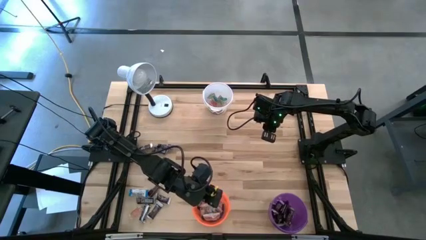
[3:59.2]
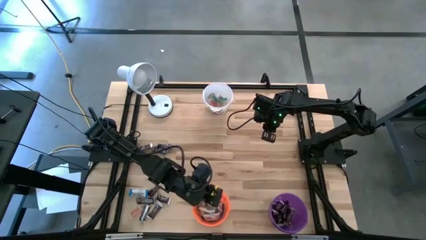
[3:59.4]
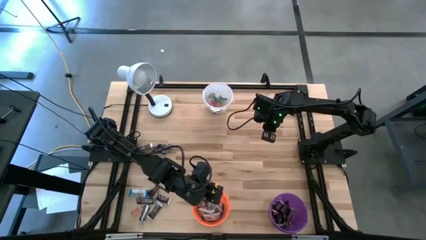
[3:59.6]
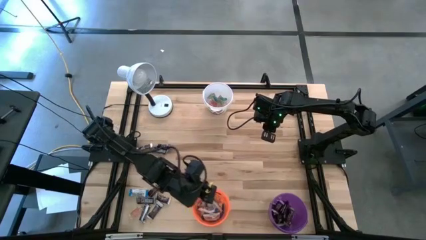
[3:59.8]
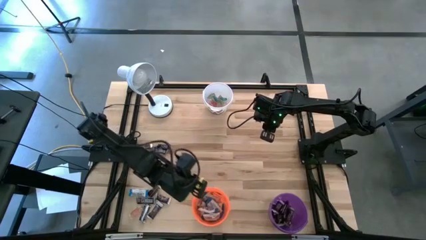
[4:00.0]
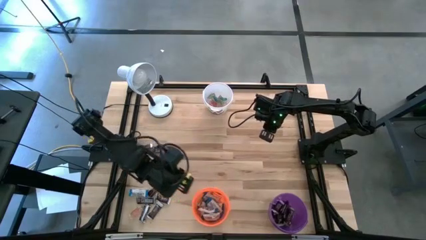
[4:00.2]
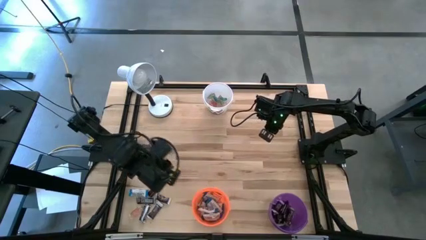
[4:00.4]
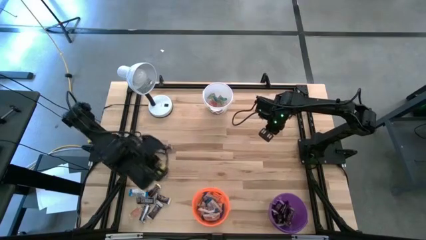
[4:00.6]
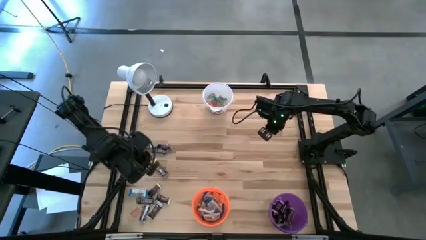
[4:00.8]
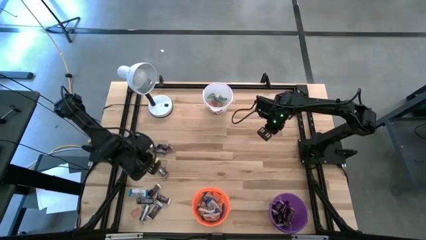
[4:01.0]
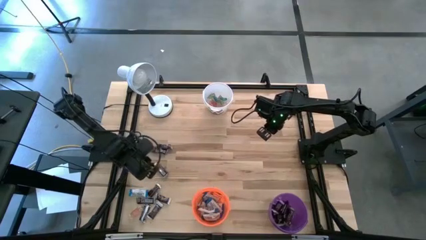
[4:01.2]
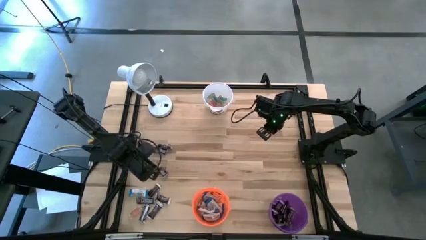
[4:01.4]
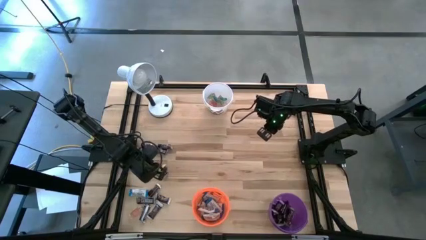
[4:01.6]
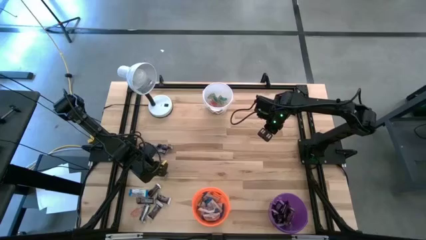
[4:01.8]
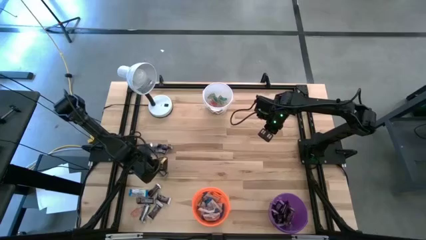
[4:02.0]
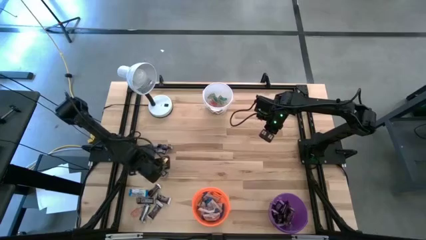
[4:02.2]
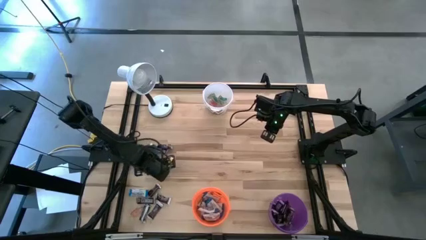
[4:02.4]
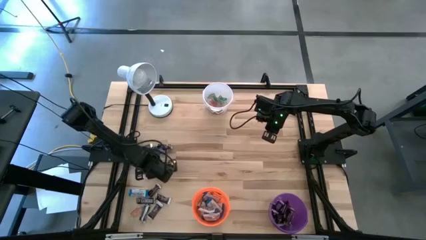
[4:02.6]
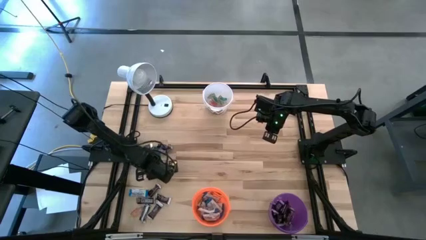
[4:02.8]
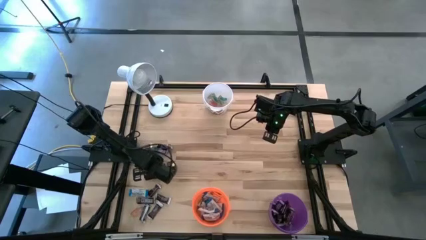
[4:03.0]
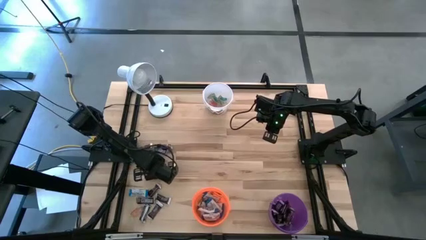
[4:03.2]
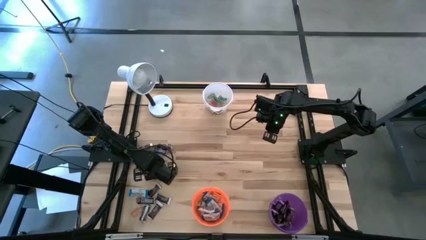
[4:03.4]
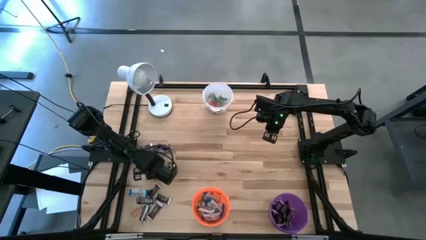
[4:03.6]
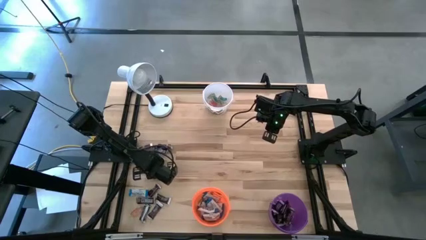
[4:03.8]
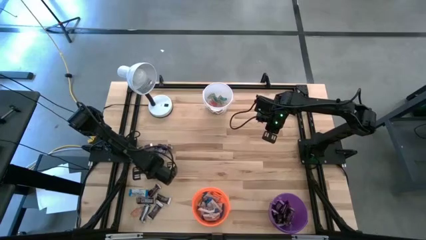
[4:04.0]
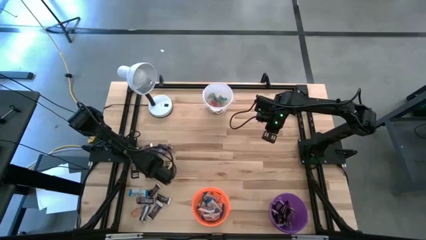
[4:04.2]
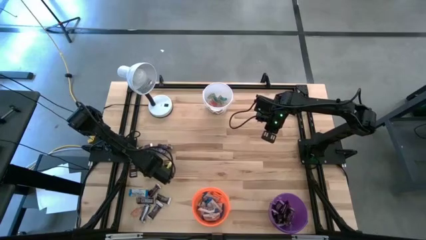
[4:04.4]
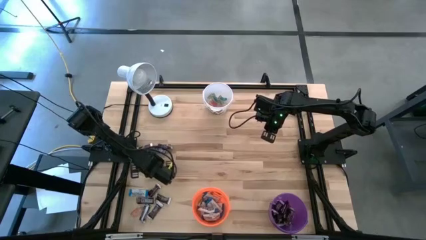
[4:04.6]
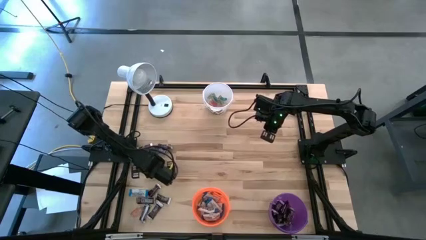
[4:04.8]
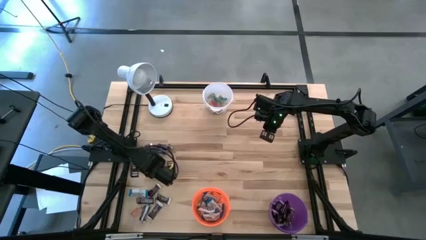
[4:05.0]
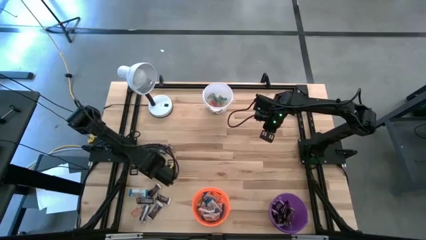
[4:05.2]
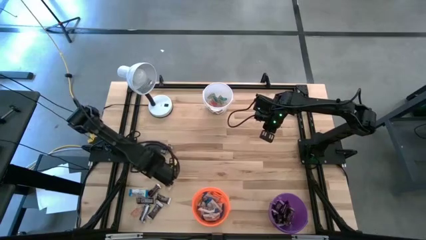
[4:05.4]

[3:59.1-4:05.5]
Task: Organize candy in baskets
Put the dark brown chocolate bar into the dark purple bucket

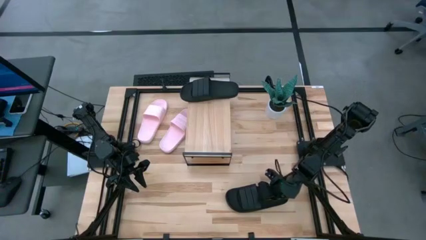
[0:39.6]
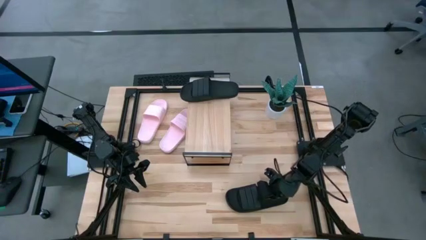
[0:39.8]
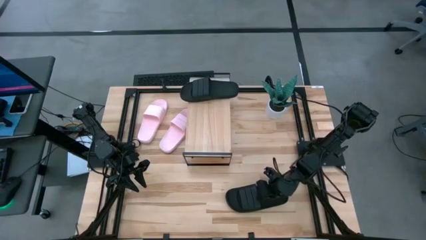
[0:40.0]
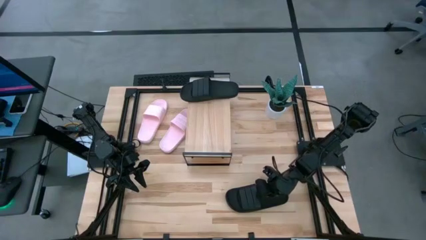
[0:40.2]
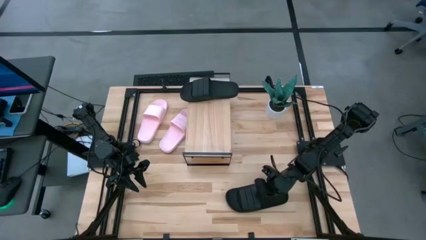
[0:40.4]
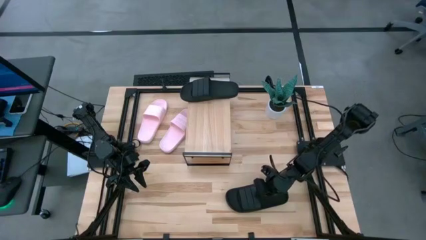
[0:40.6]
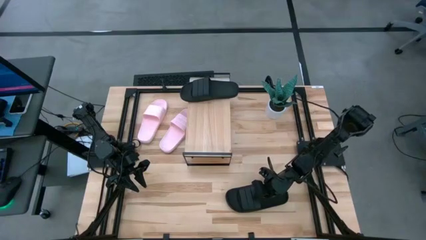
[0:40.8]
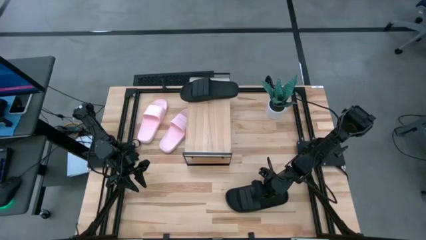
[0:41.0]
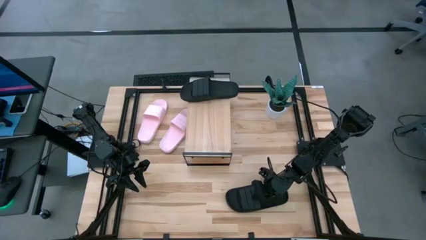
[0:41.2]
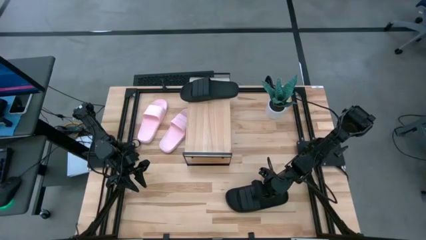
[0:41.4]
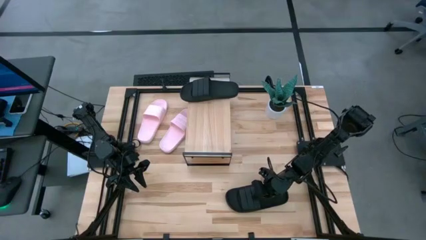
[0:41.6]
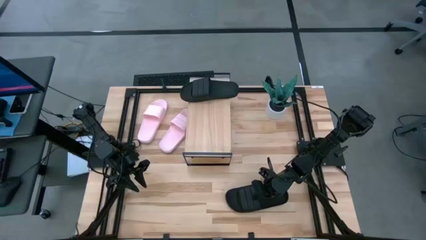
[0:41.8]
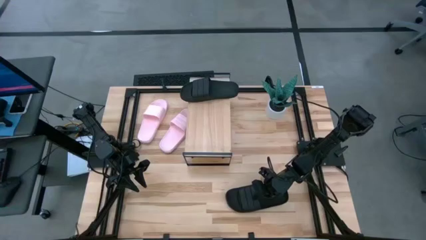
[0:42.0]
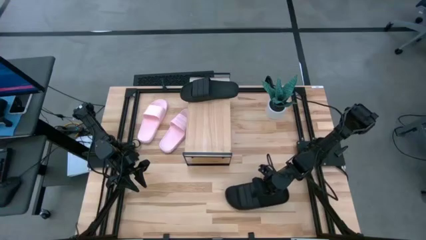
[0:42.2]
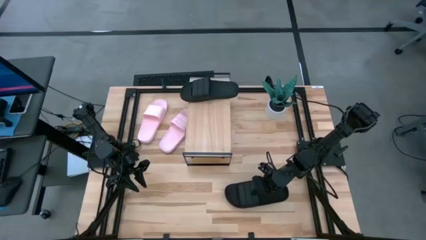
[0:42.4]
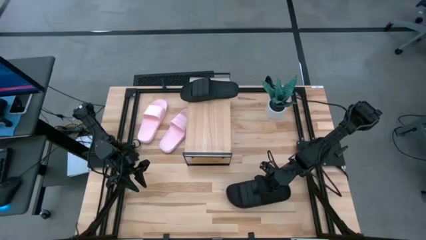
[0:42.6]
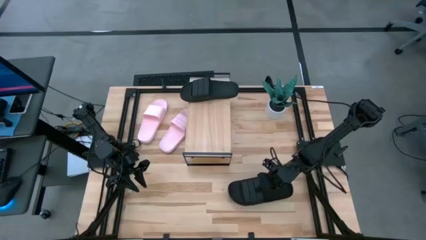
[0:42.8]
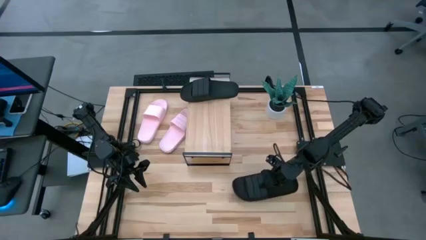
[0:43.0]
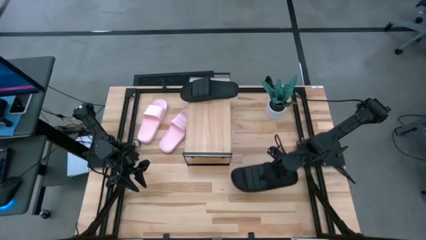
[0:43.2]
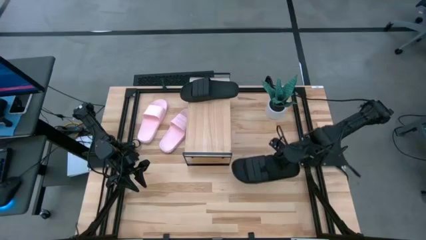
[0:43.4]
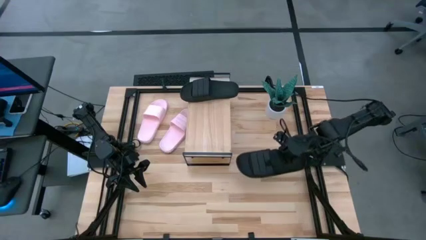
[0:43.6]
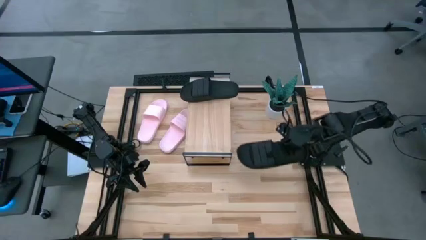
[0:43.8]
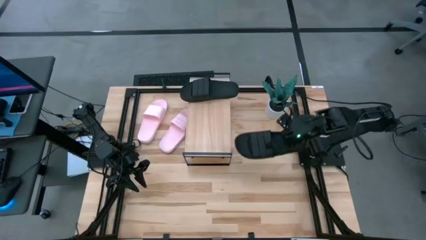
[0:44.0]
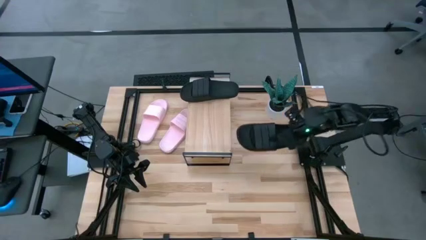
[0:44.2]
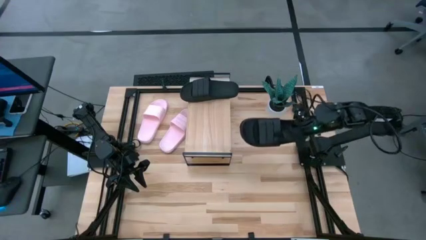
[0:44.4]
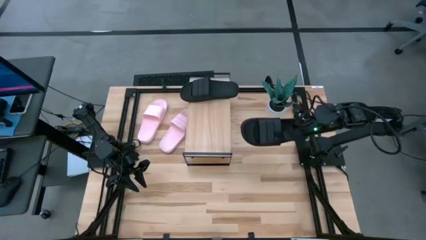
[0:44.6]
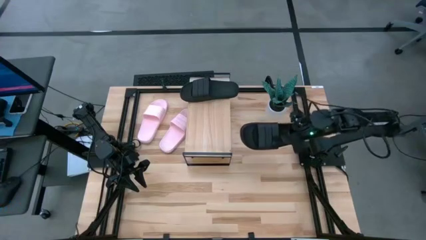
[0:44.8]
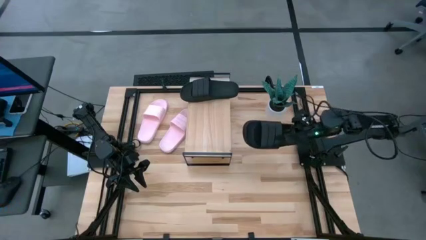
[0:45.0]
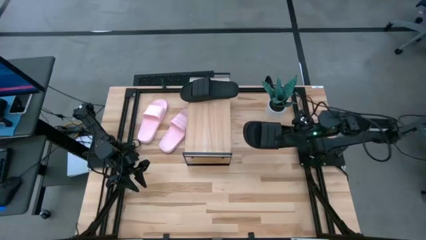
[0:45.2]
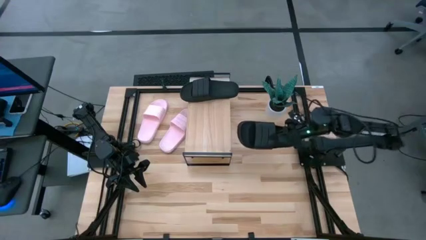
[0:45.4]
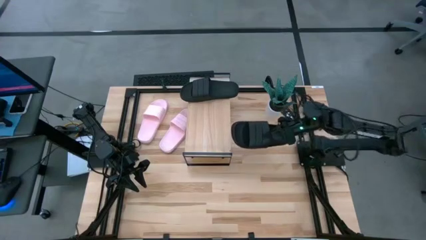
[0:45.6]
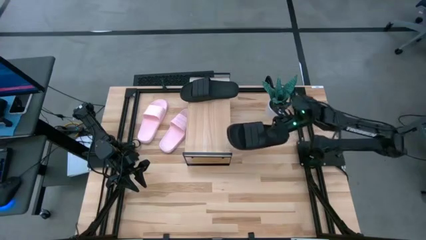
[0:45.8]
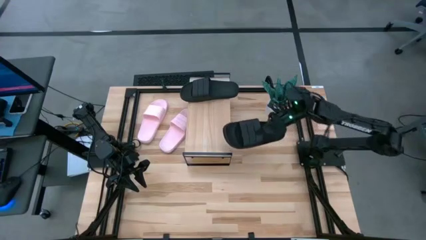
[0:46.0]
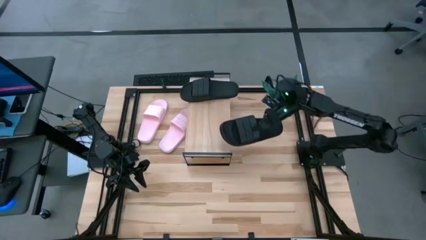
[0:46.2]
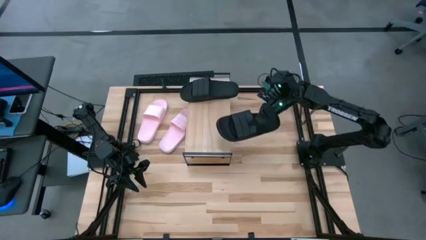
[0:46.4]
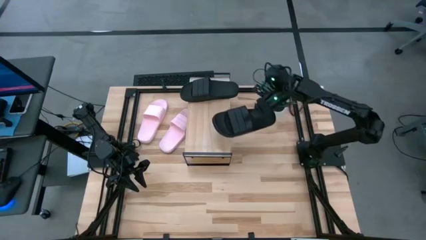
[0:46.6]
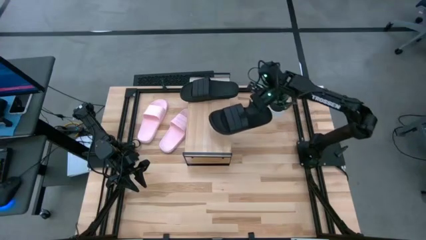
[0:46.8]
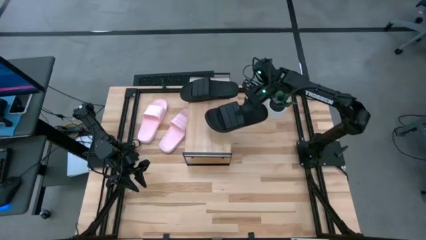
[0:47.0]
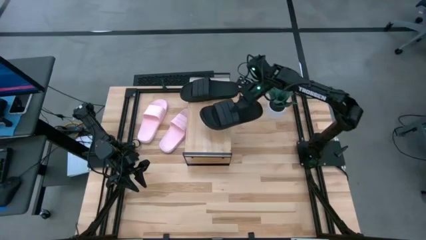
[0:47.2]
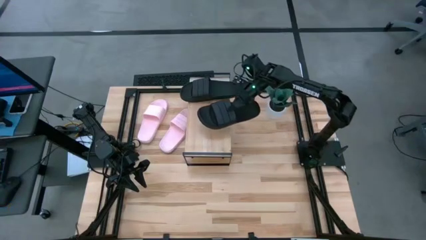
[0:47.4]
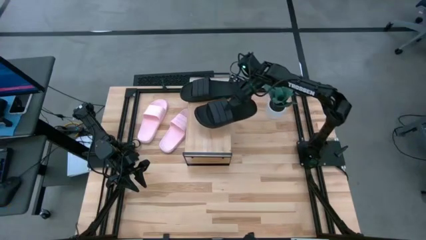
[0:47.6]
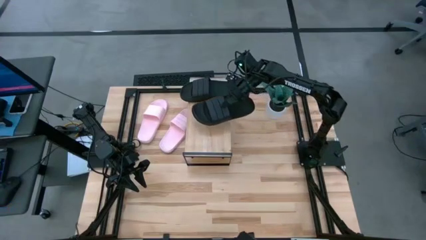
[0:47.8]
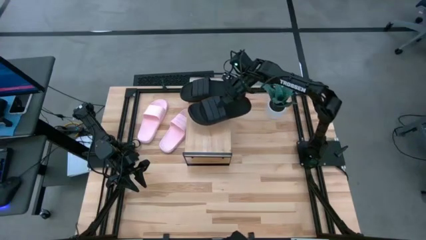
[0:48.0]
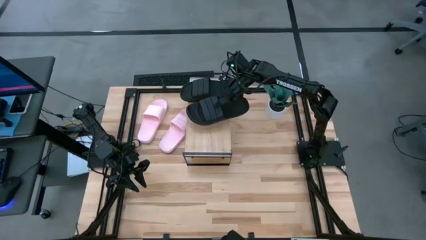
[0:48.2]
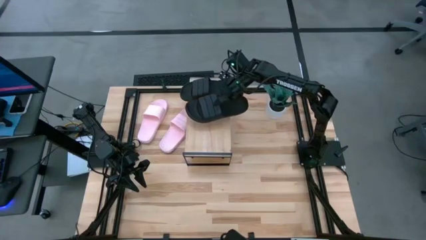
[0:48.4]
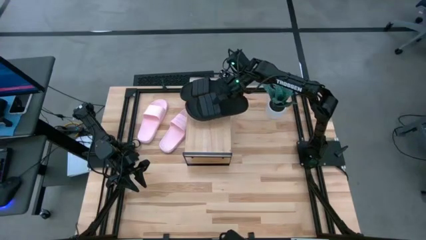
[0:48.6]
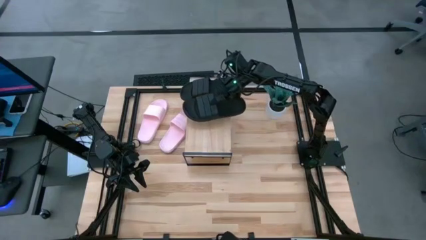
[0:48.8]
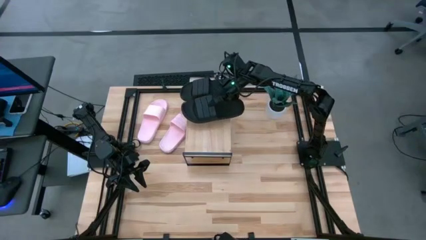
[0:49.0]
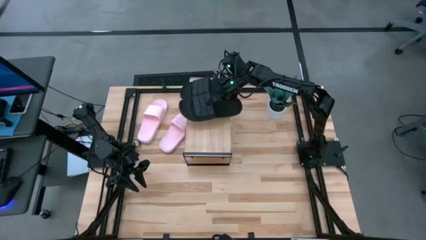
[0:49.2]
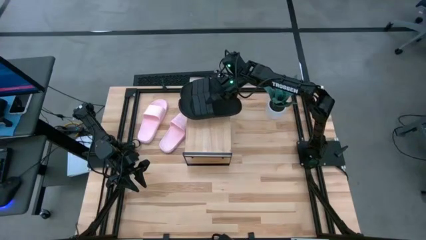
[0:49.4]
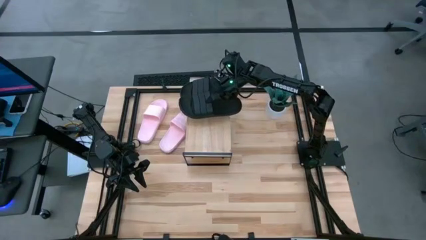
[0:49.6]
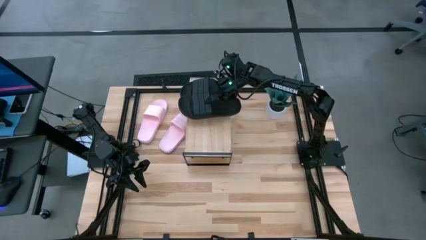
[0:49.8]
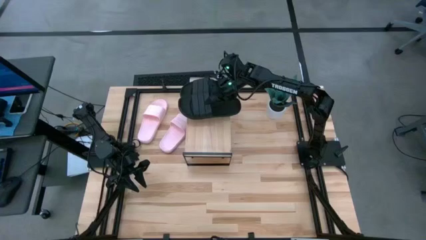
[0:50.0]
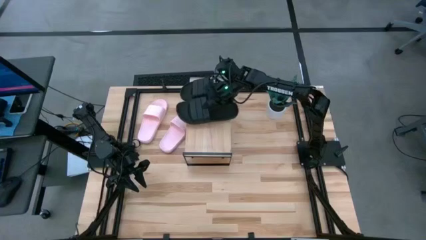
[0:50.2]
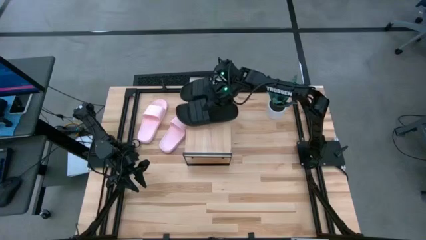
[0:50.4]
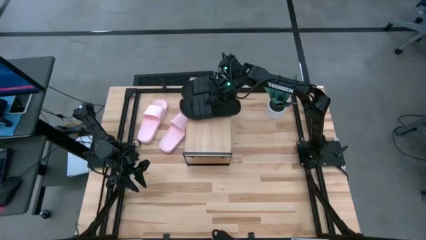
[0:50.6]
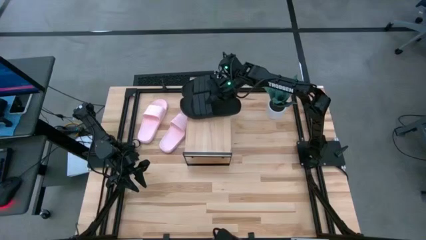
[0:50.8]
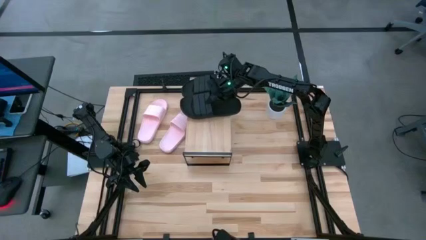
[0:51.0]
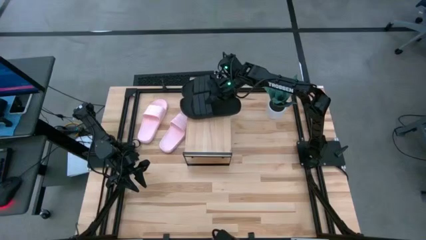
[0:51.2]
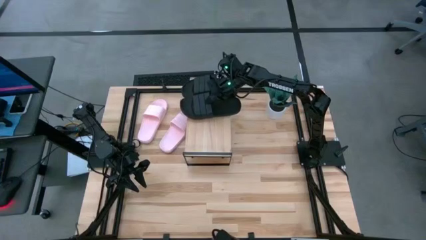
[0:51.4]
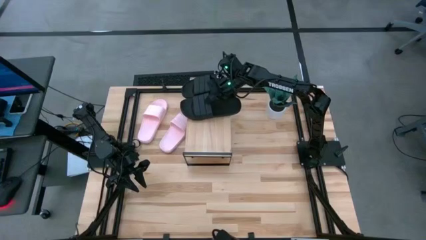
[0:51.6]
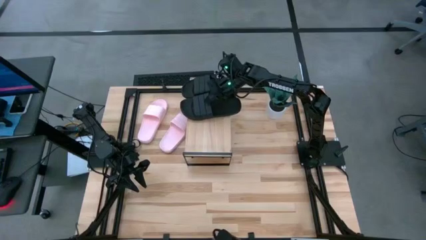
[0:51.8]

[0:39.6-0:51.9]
Task: Pick and place slides into the shelf
Put the black slide on the shelf
